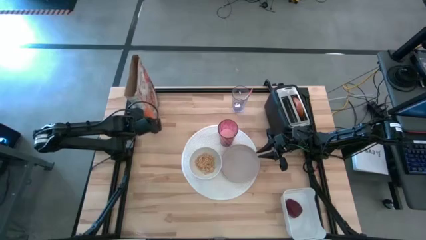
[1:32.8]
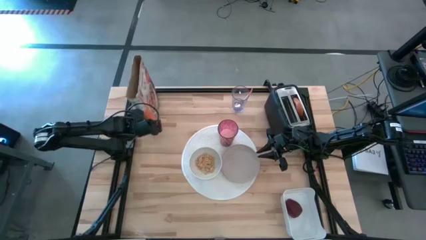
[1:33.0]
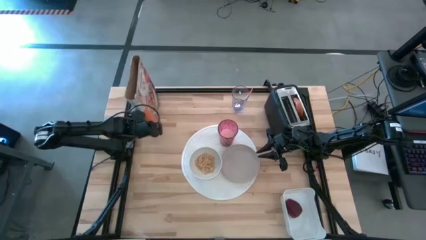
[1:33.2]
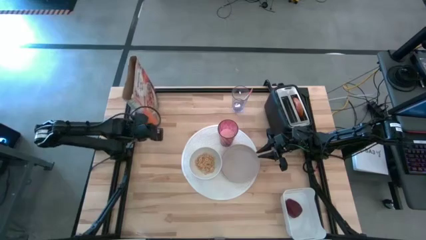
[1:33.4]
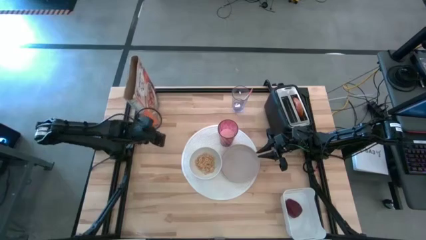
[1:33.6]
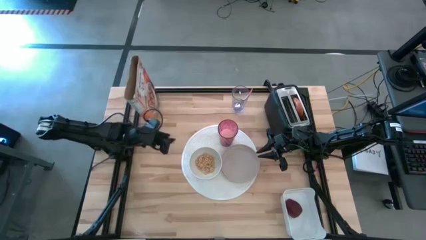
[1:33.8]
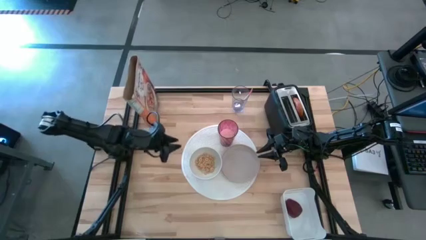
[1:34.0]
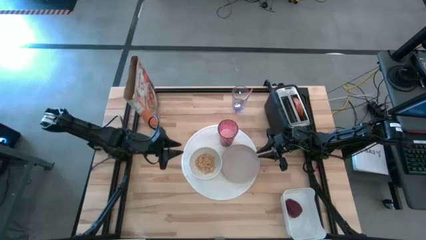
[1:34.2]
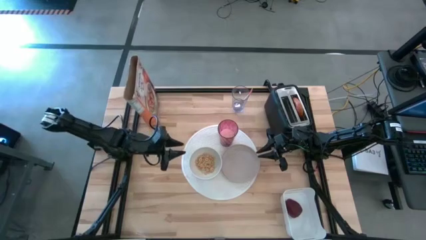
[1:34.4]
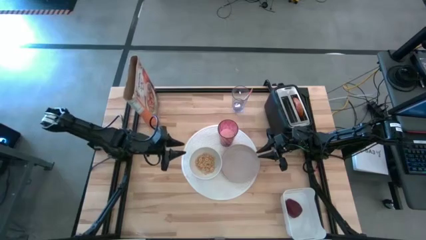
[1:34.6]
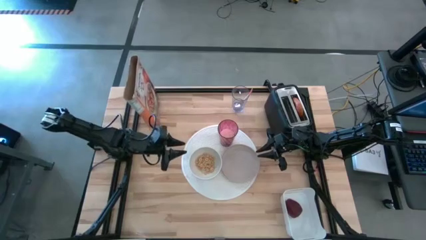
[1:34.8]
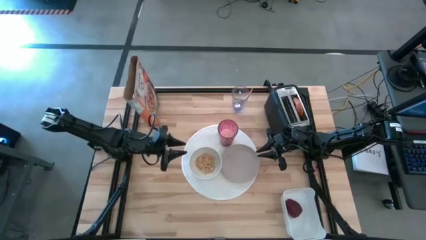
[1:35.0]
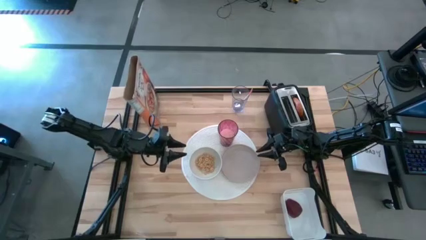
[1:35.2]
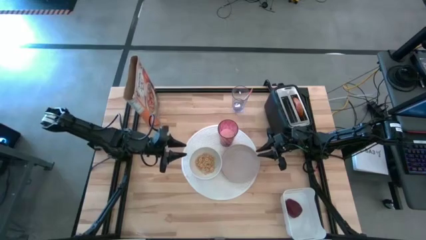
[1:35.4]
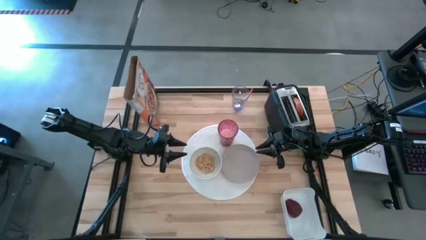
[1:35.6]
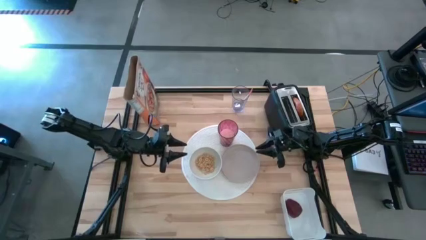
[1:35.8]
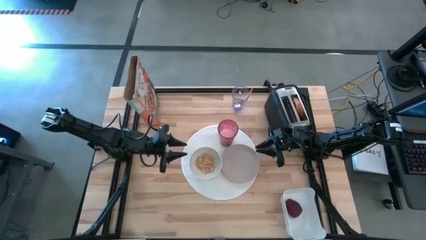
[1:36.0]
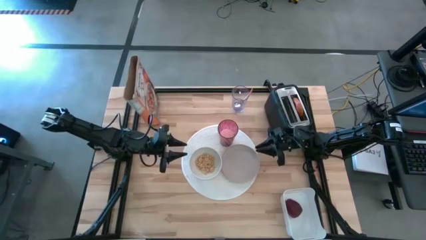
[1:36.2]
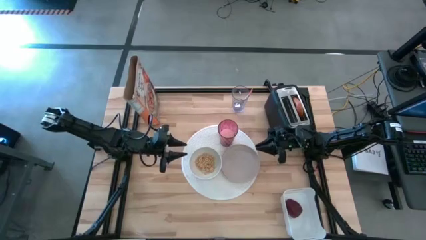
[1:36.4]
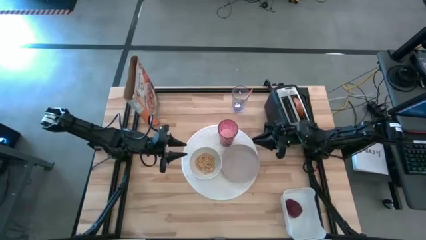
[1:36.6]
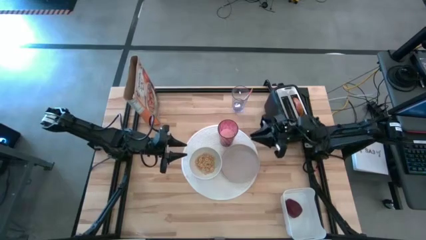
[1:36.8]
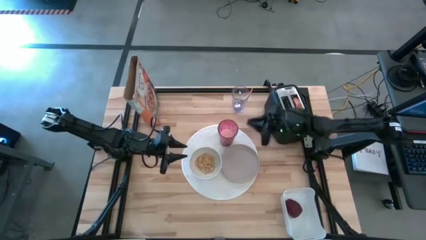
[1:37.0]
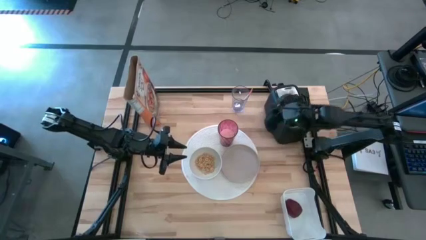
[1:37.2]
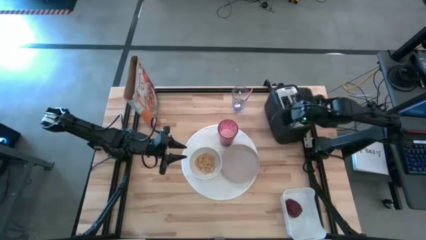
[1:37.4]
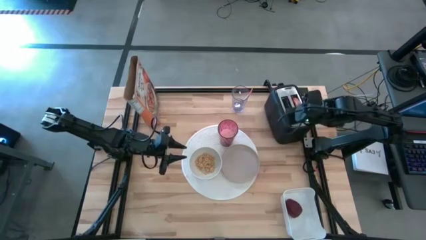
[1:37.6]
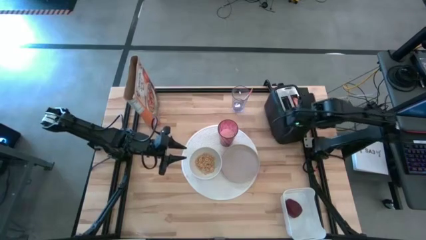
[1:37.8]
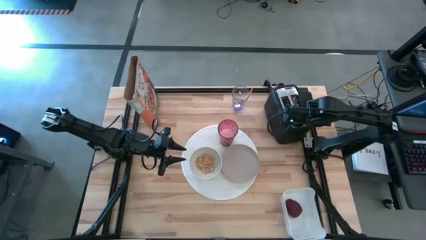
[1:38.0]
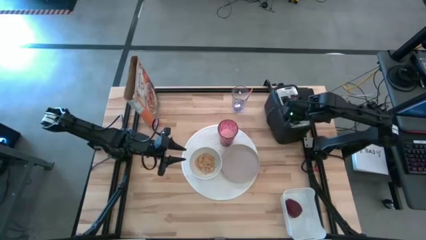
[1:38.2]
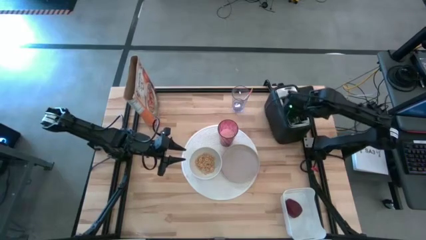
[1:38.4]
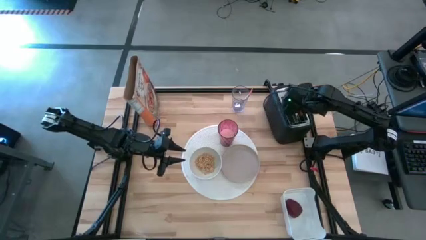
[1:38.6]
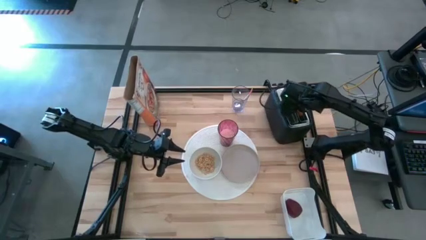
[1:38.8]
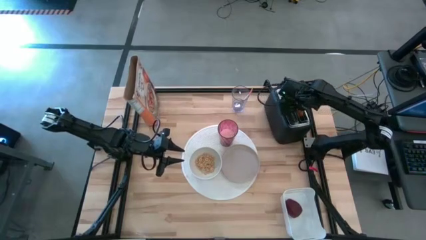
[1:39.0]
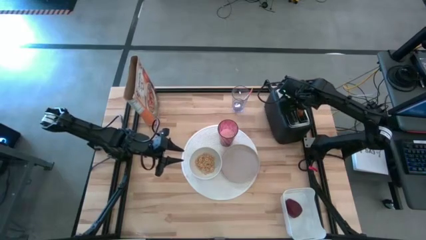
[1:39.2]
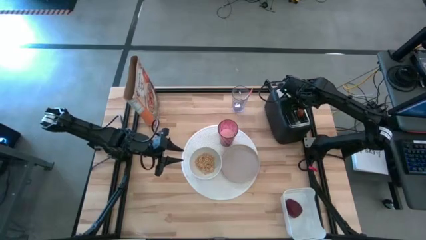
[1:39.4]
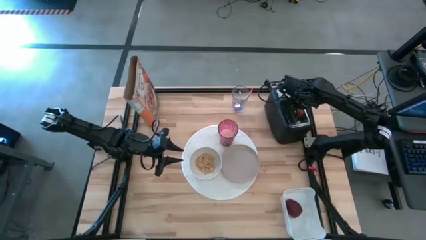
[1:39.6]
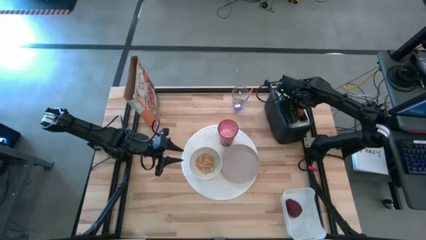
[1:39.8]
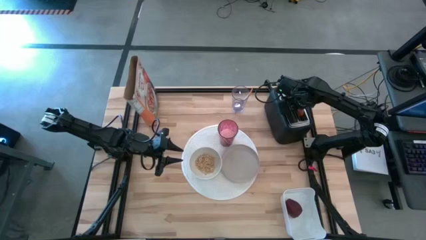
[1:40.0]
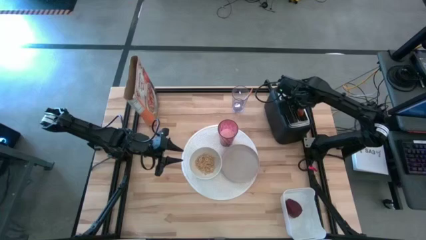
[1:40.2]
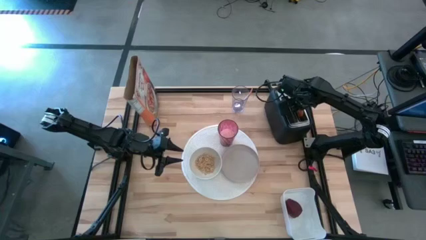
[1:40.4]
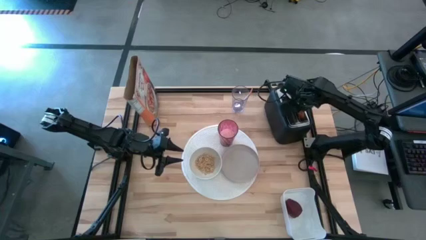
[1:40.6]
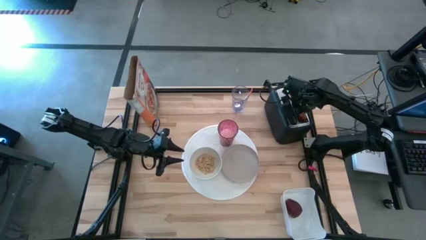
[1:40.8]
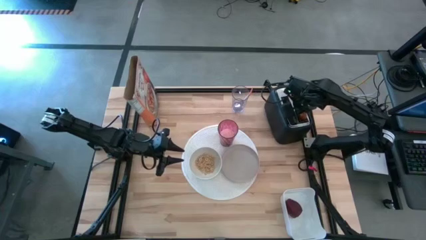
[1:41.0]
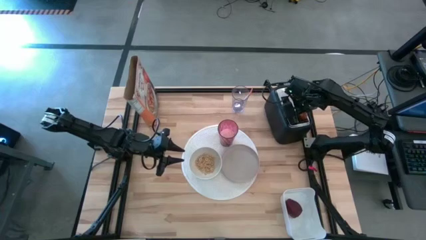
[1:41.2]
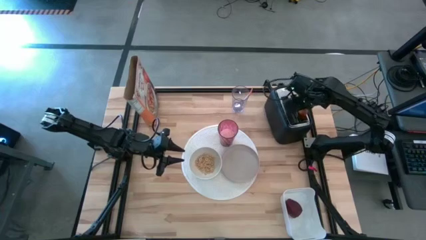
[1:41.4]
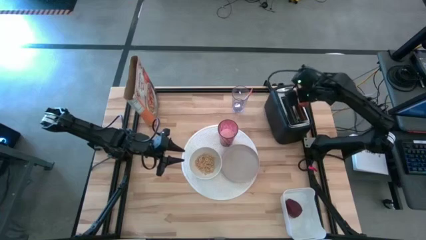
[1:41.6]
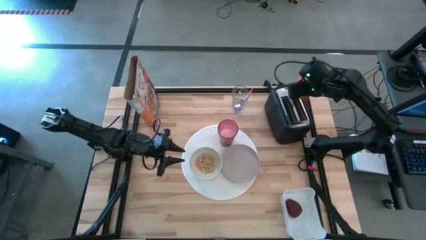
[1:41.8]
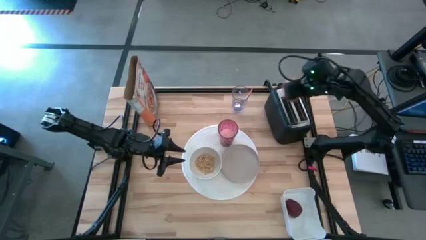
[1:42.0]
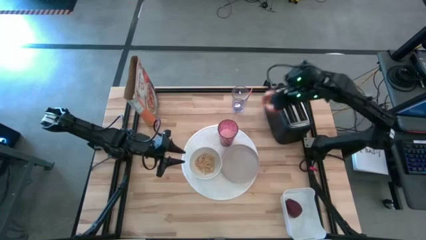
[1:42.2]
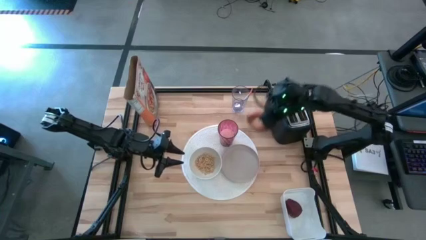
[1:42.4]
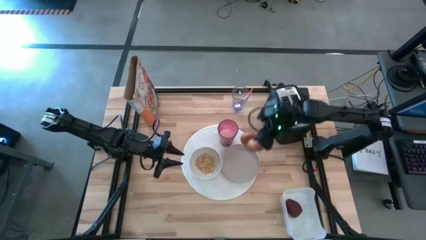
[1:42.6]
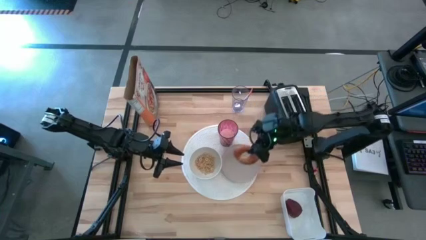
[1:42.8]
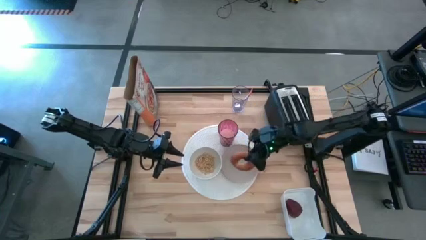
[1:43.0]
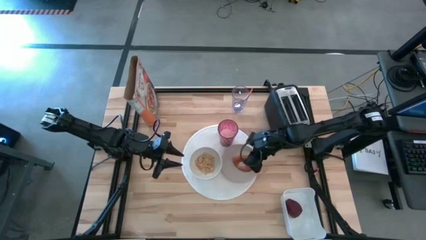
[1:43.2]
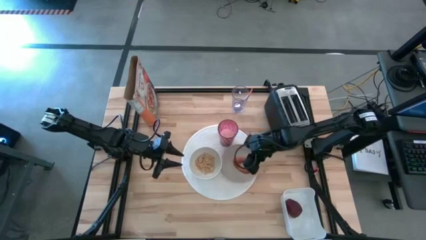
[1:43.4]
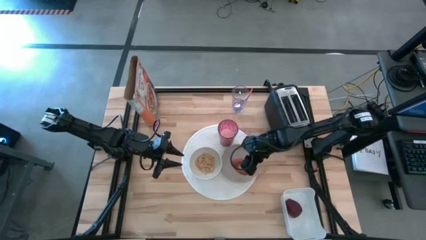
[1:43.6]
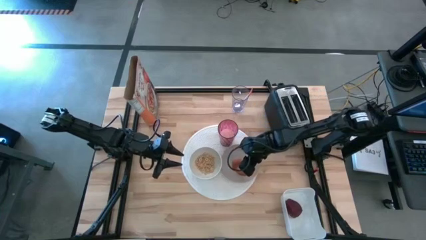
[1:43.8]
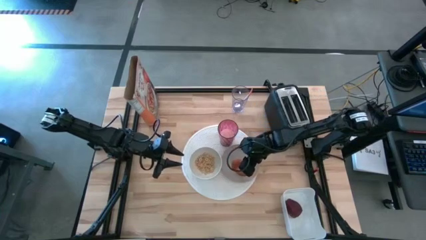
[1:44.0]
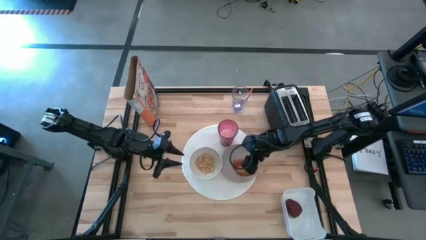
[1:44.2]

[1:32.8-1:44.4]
Task: Arrange a breakfast setting
Put the toasted bagel on the gray plate

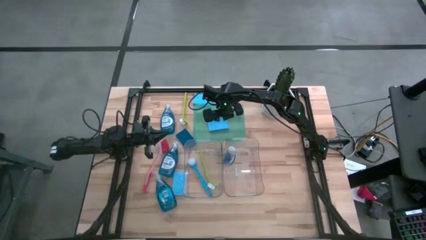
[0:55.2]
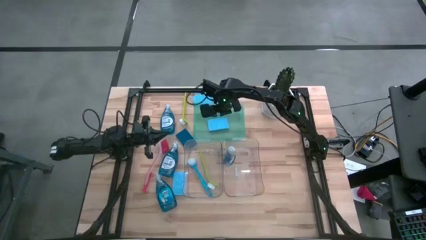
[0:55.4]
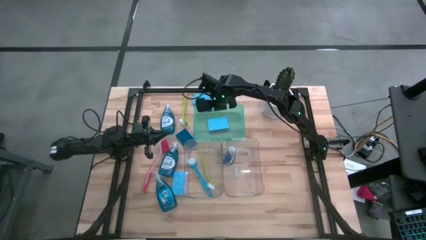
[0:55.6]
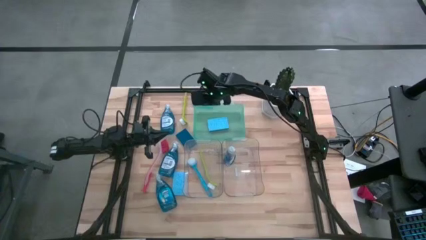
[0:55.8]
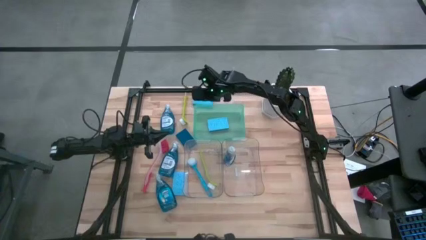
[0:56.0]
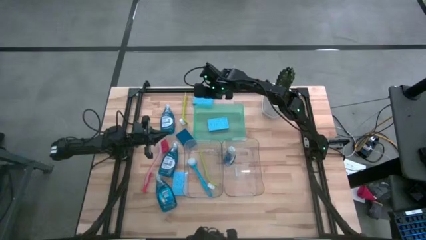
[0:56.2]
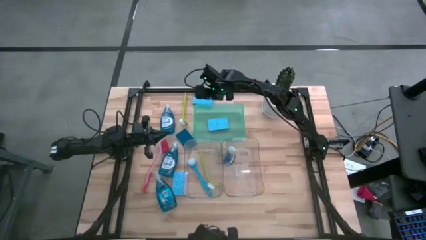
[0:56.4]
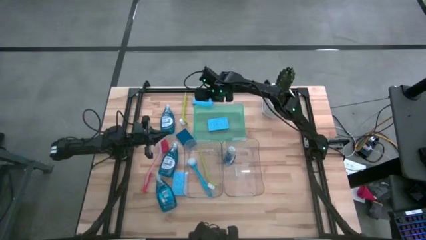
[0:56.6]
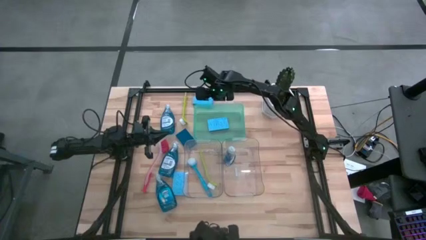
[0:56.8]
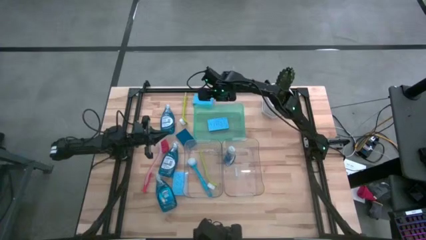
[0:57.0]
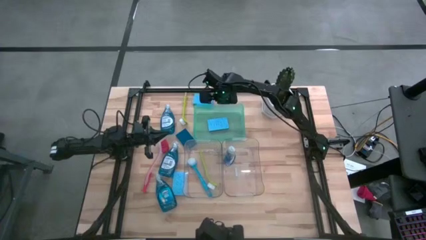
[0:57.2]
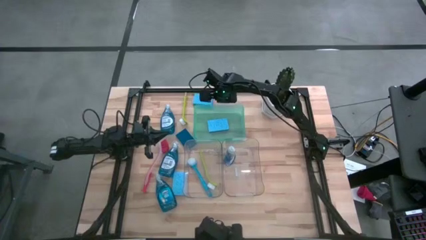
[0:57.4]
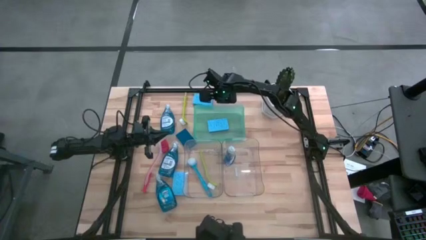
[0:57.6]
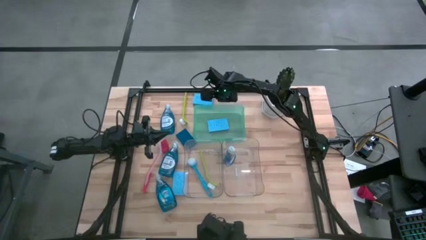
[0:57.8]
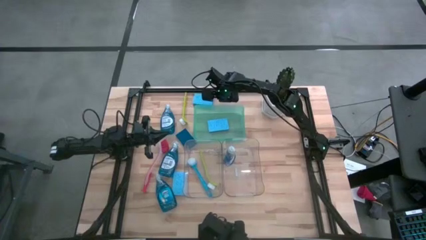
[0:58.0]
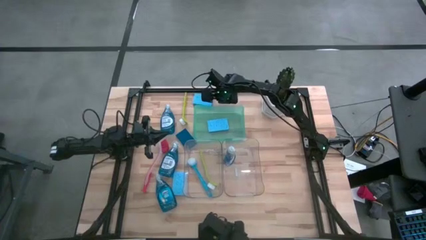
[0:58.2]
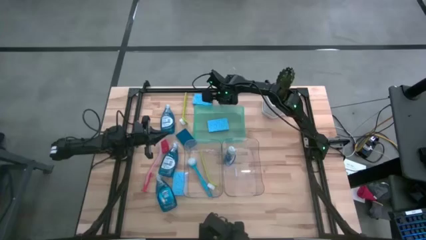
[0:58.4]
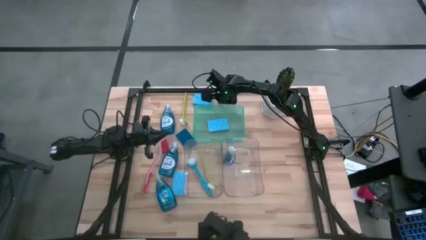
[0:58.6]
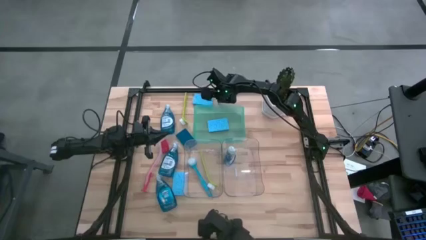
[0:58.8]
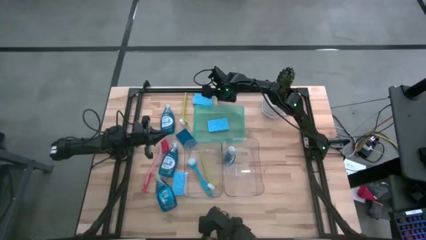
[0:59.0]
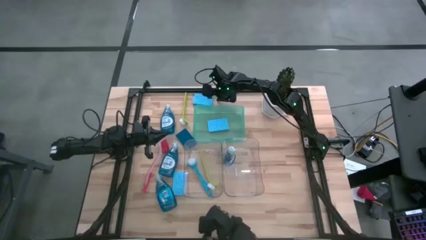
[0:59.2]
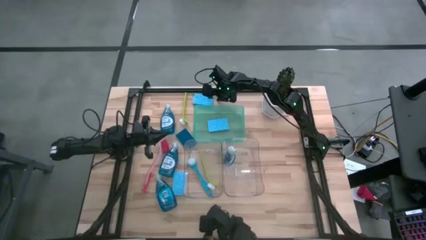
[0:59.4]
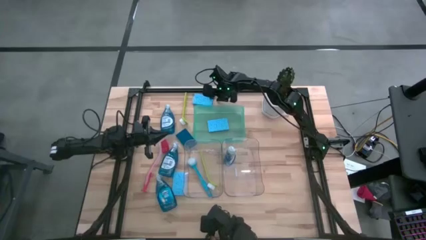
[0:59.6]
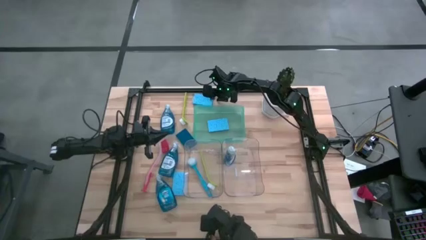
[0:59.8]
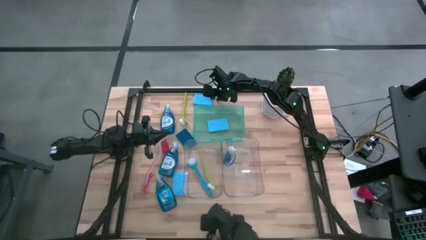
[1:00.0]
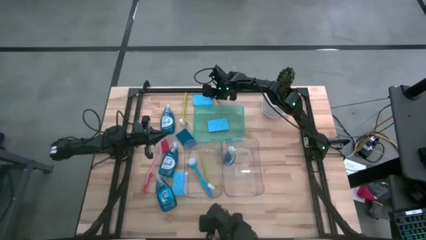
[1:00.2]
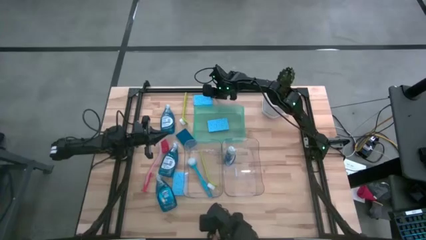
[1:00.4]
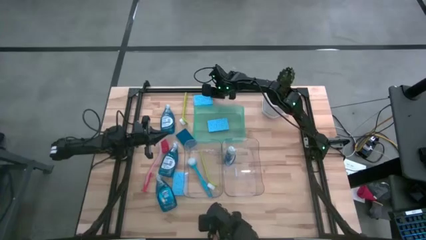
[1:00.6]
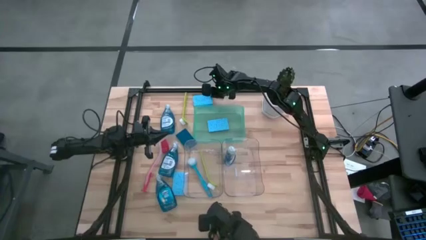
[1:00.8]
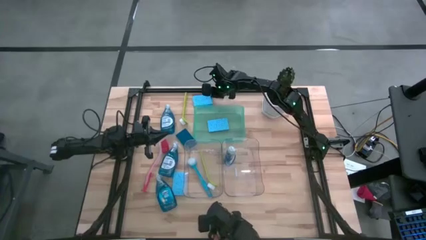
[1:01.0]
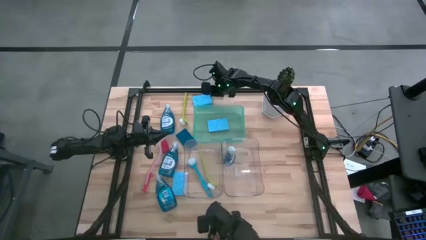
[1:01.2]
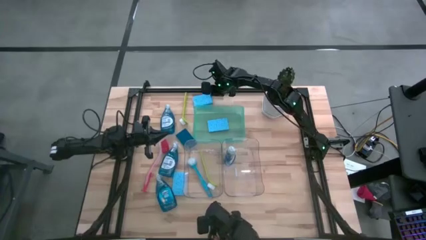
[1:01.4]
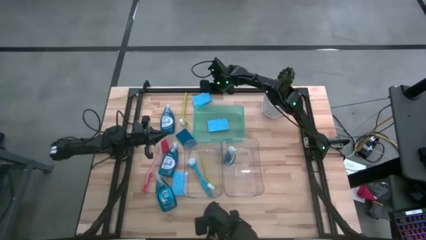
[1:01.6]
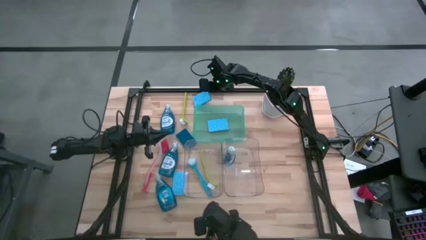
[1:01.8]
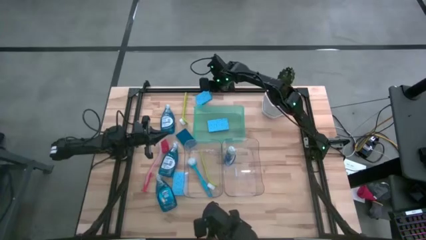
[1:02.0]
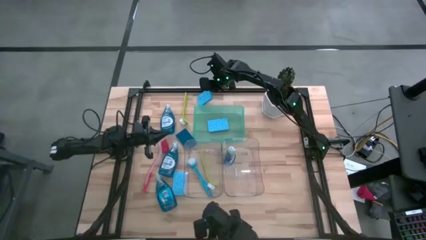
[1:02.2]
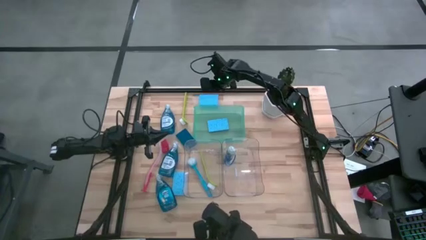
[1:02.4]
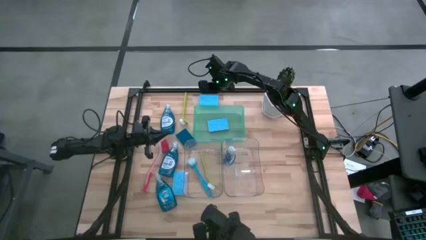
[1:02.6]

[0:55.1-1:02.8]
Task: Pick & Place Kitchen Sink Supplies
Put the blue sponge into the green bin
